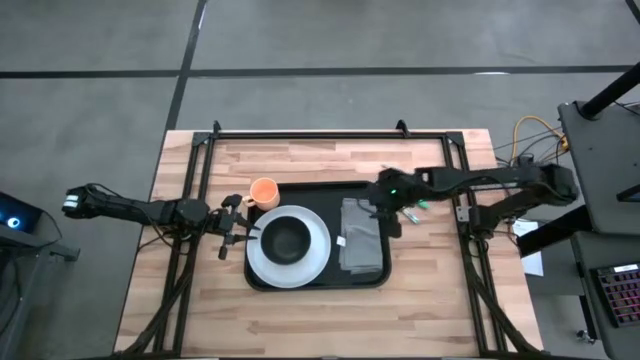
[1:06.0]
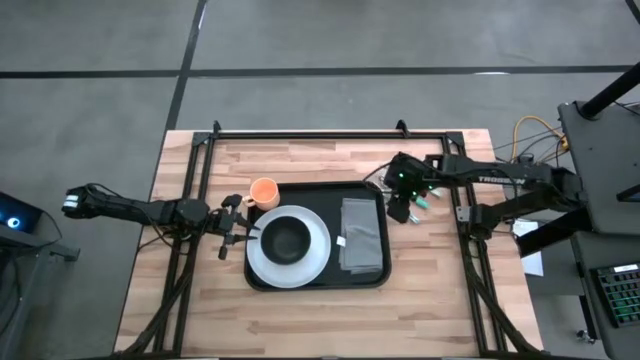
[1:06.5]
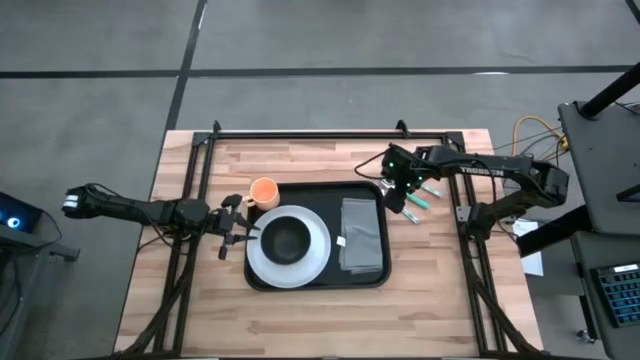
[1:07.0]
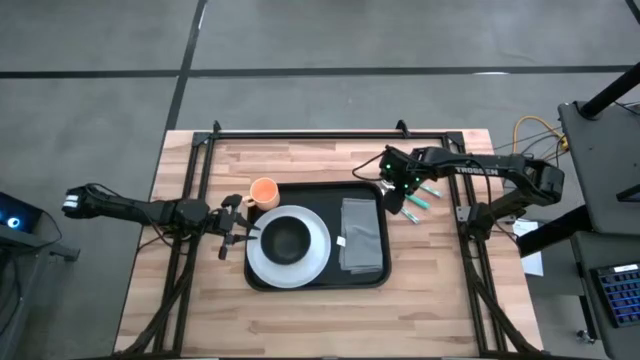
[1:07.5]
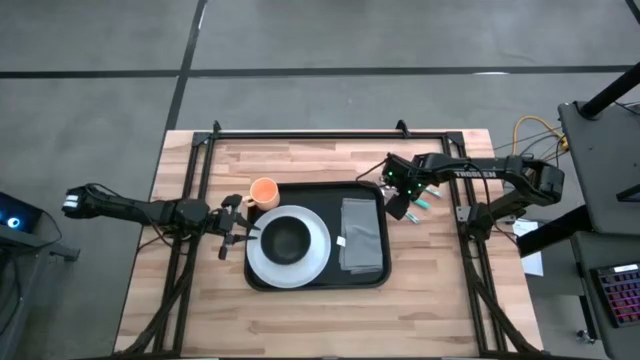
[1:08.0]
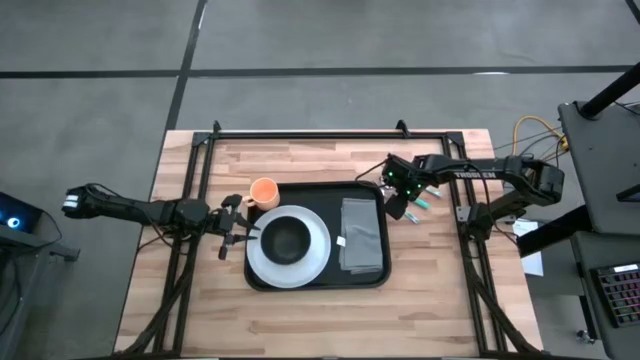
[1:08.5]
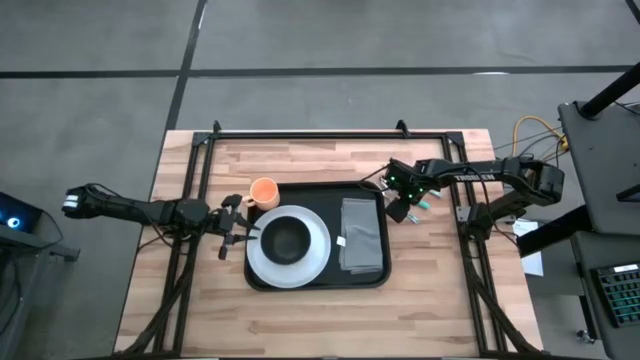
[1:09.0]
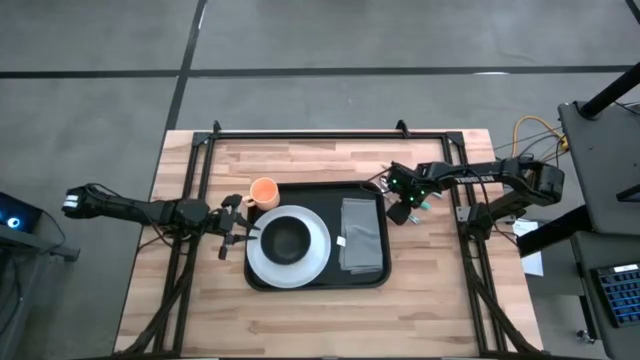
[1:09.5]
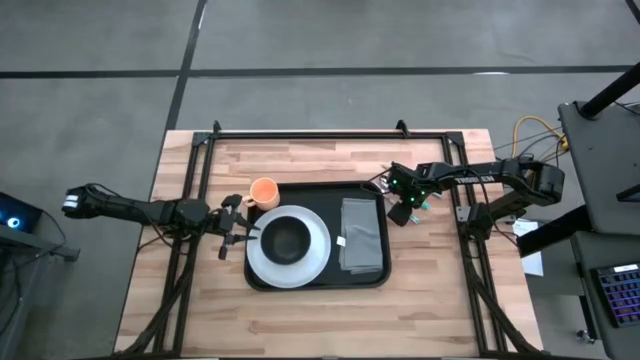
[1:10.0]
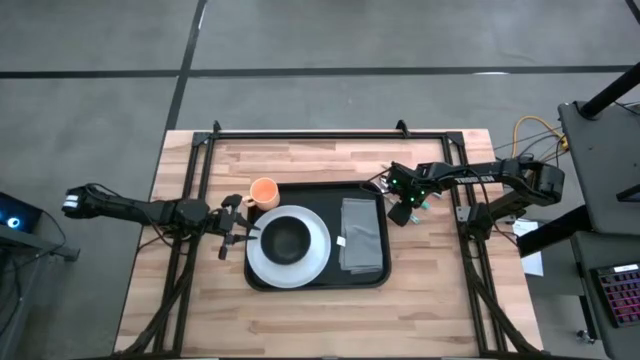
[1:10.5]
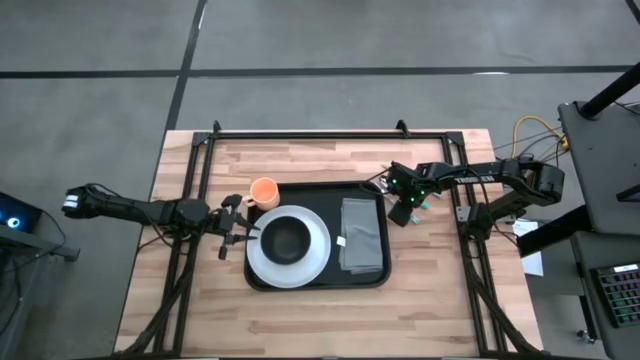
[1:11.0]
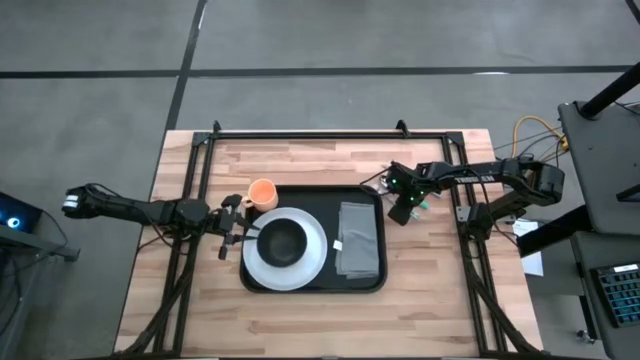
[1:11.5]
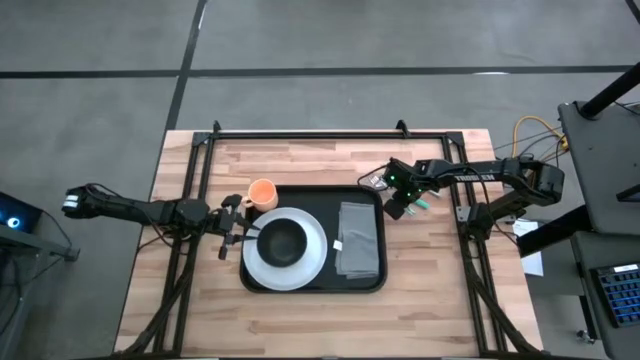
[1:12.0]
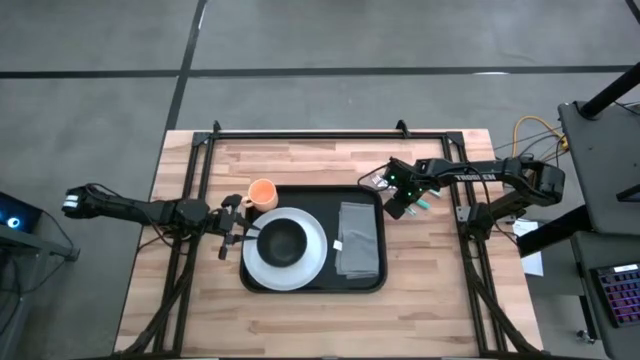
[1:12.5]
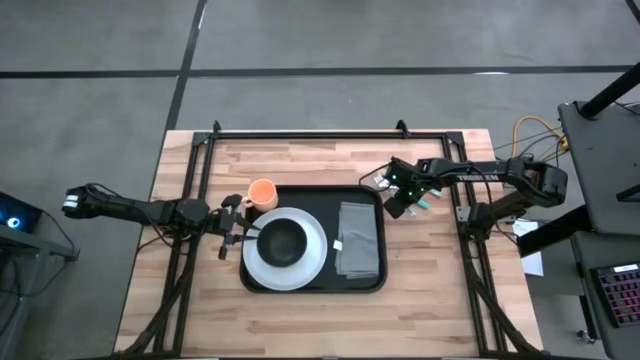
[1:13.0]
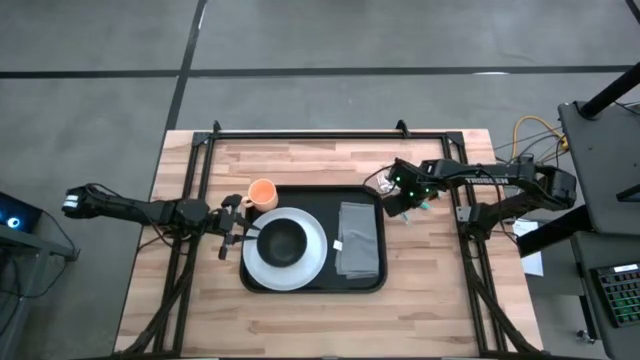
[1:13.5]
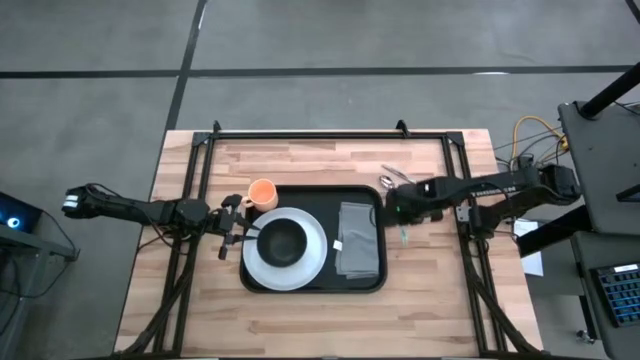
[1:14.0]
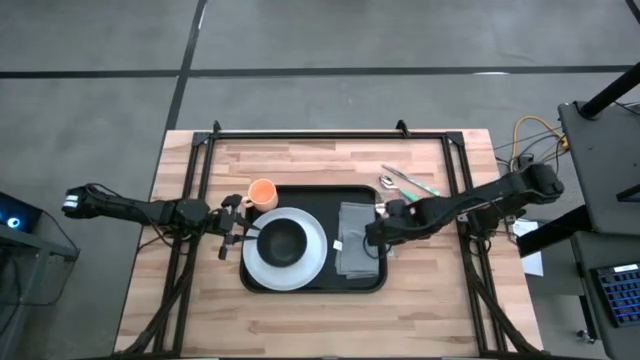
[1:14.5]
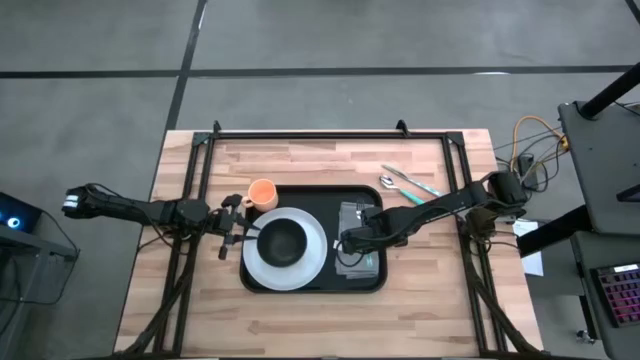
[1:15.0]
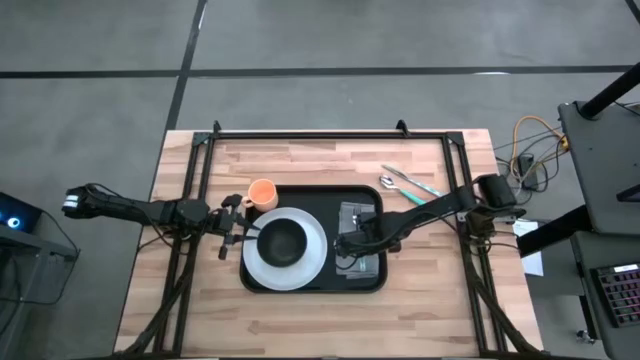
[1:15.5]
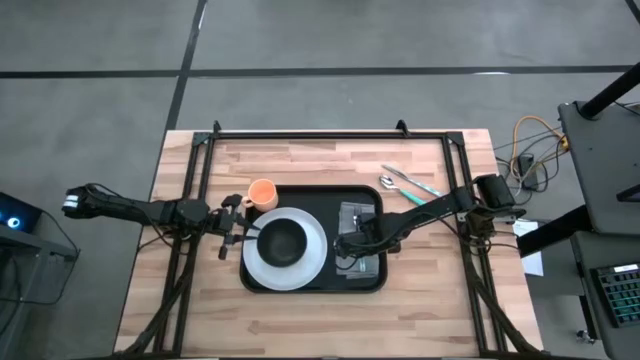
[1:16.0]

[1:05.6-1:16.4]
Task: Set up tray
Put the blue fork on top of the gray napkin

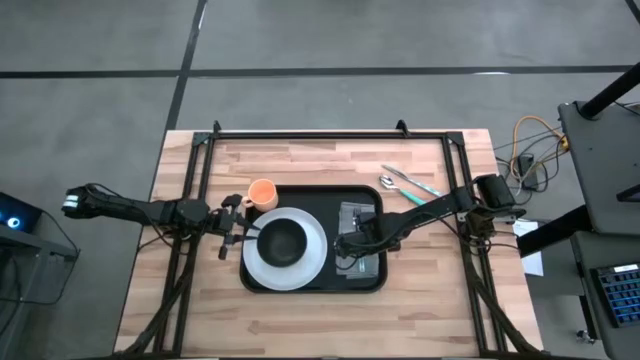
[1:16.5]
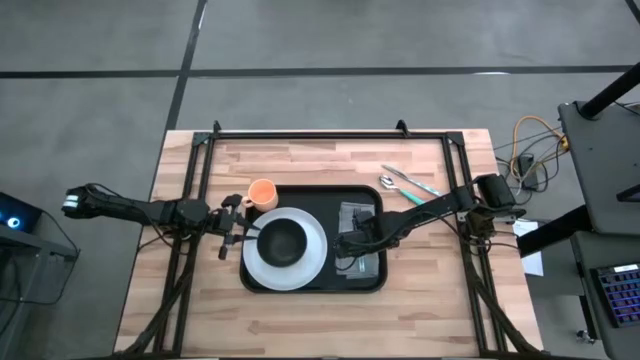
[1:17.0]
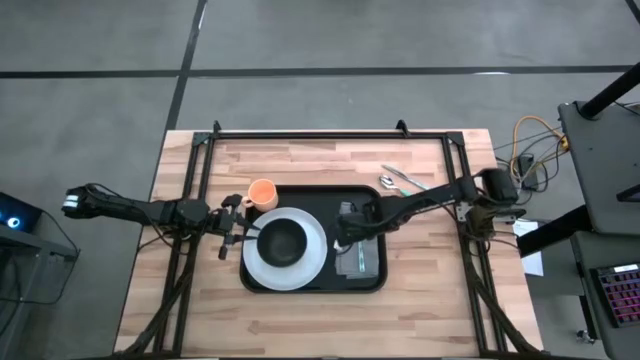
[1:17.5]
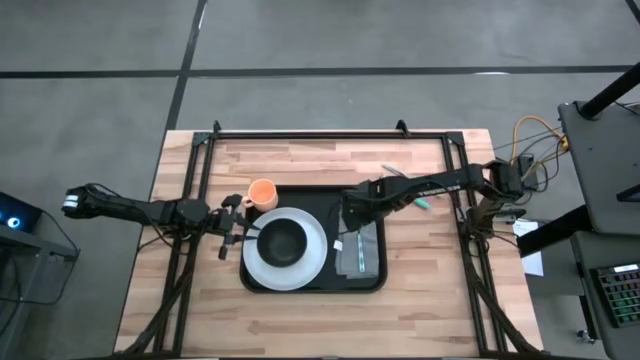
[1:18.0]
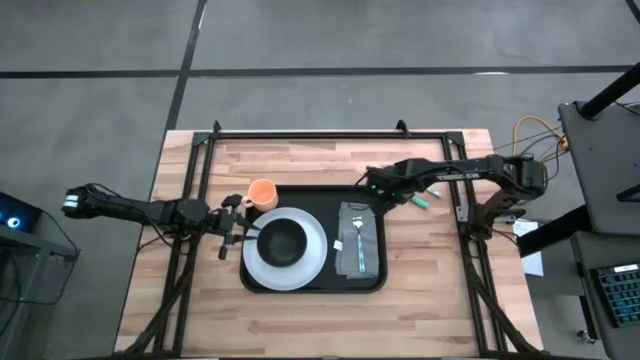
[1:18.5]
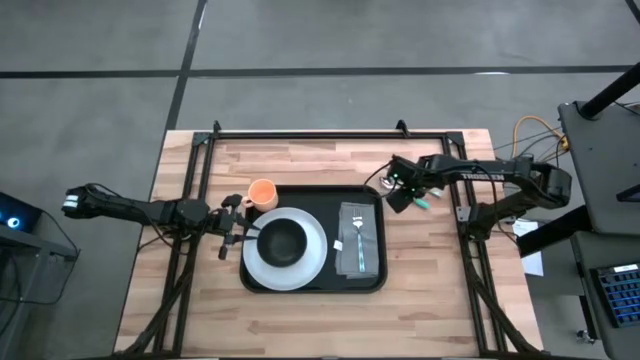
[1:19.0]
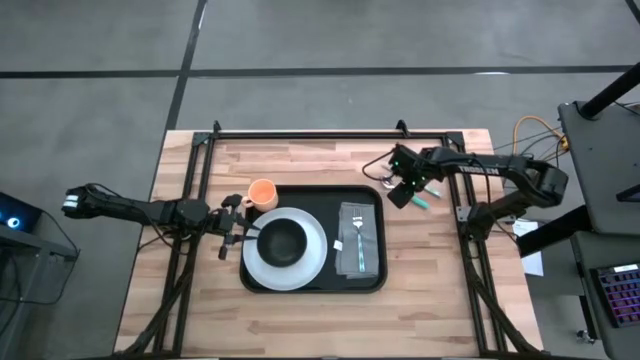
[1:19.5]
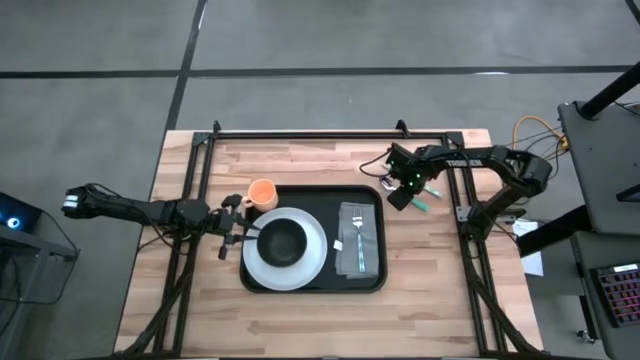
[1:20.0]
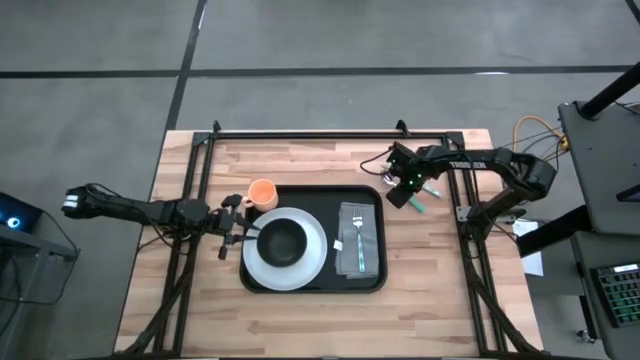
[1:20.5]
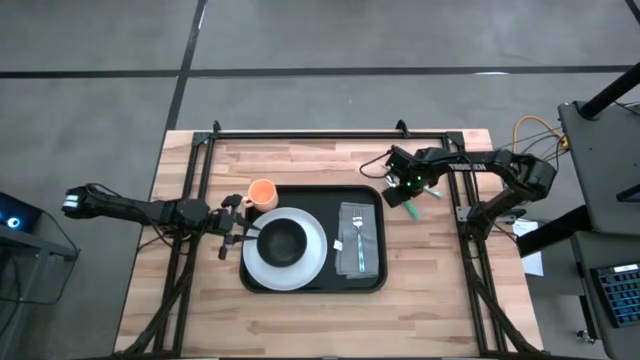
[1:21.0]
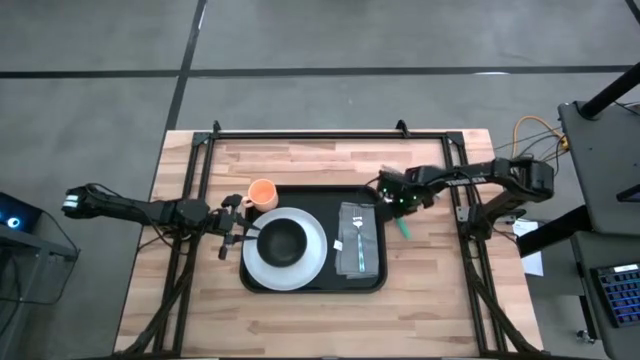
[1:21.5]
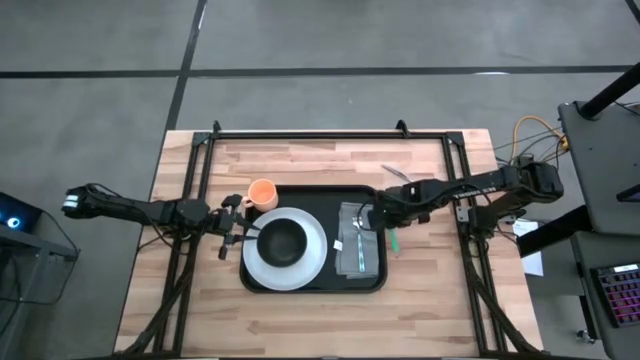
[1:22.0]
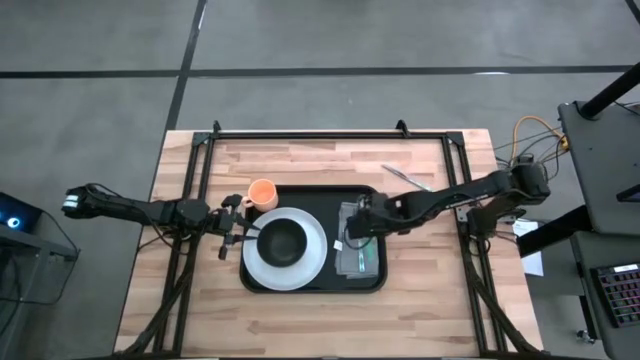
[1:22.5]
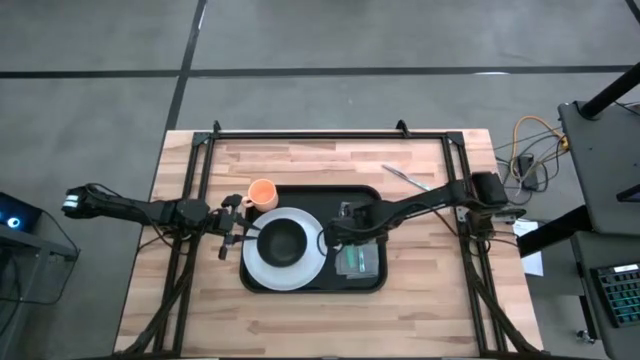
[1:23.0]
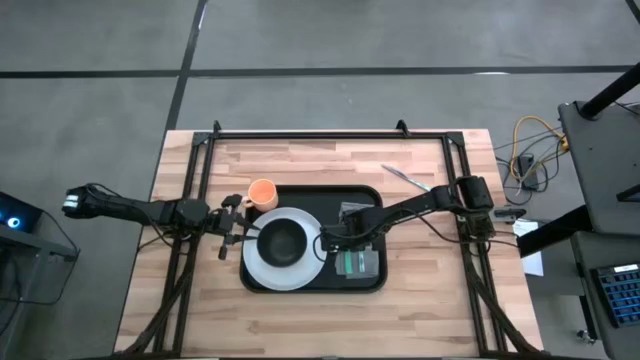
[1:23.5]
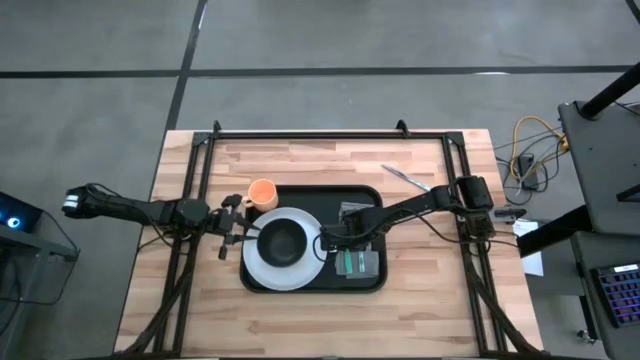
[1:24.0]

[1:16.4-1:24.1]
Put the green spoon on the gray napkin

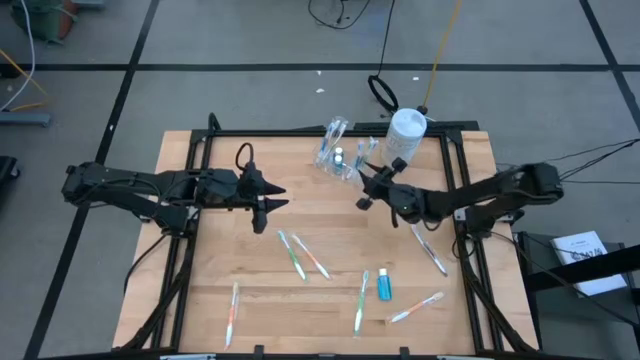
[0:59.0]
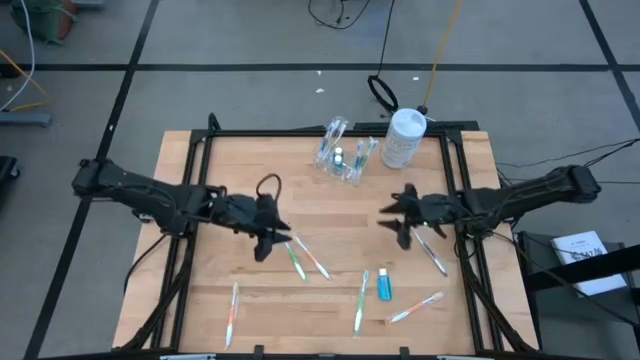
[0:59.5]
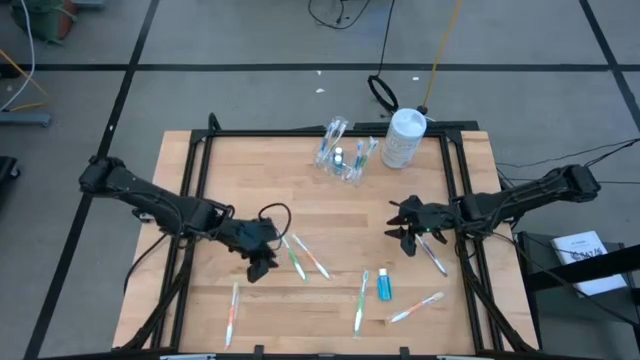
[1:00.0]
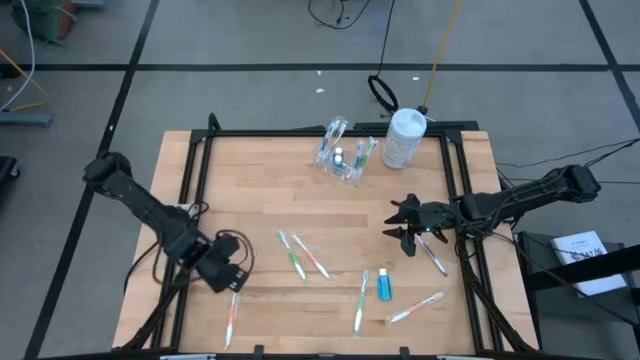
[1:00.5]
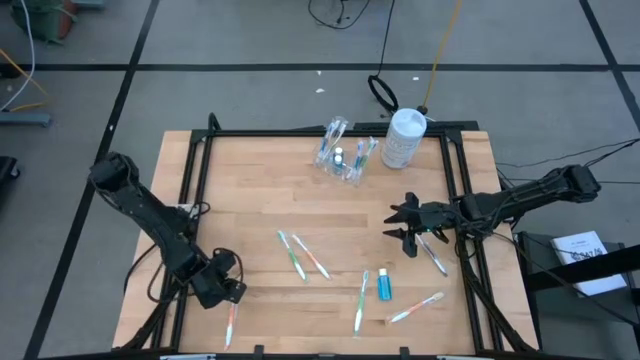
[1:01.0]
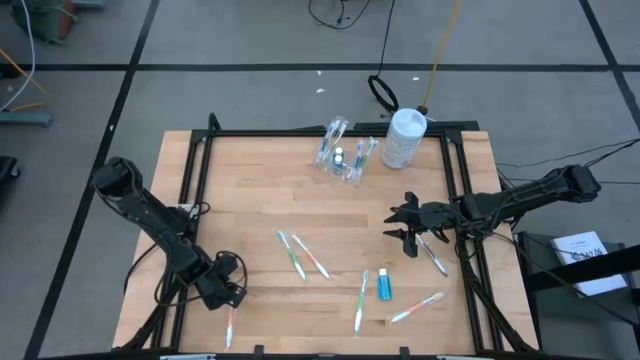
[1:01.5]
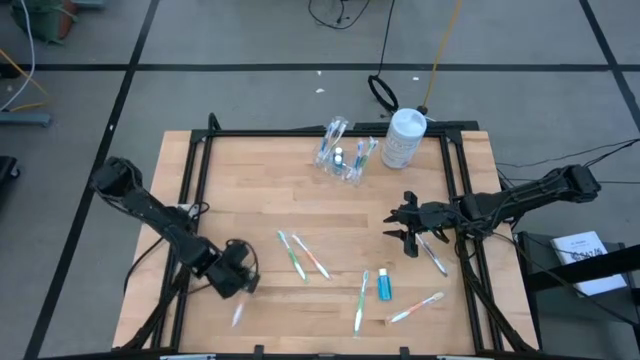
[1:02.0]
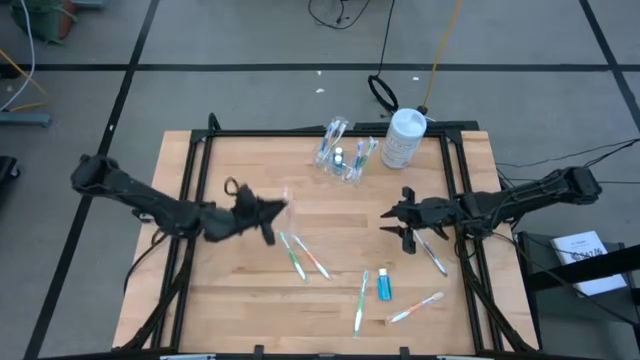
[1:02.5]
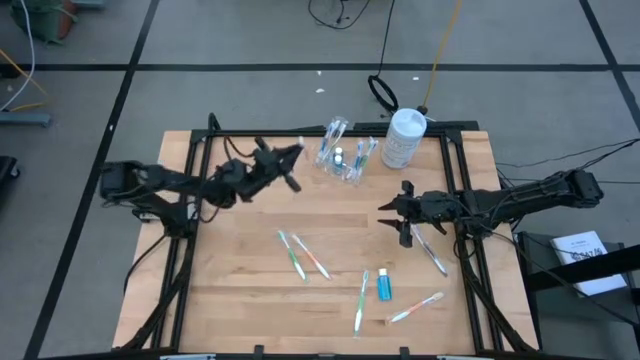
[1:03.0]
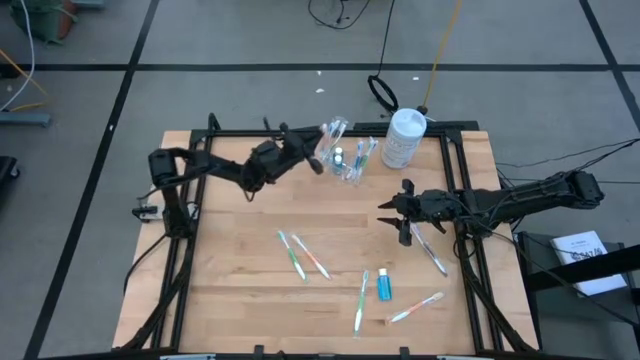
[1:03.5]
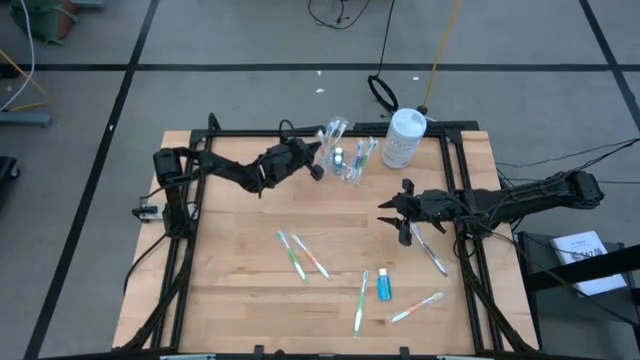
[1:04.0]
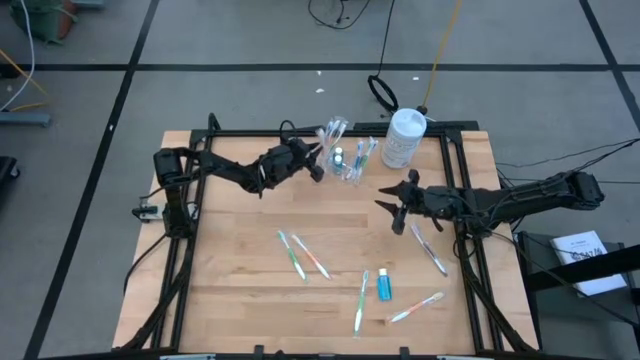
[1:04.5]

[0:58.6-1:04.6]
Task: Pick & Place toothbrushing station
Put the orange toothbrush into the transparent organizer
